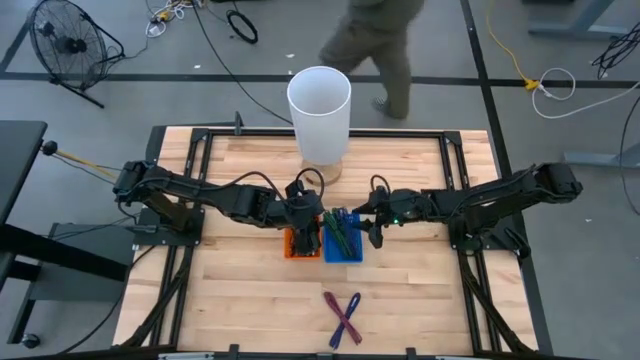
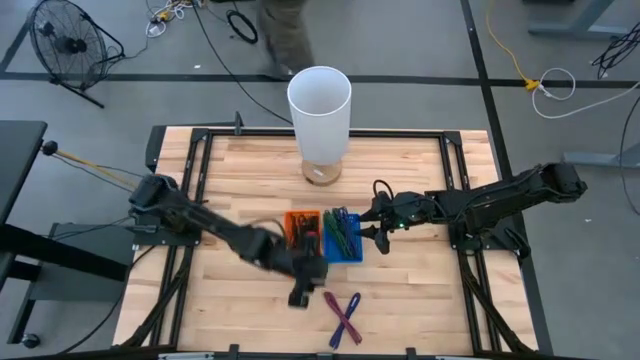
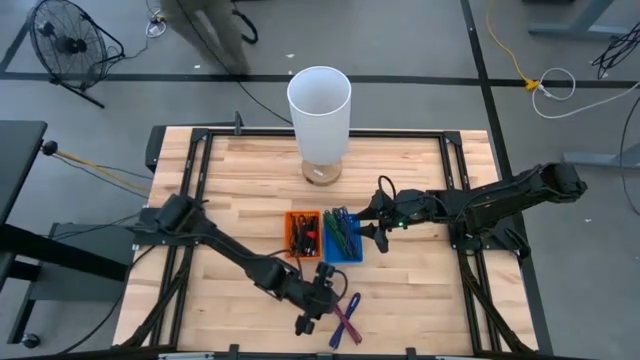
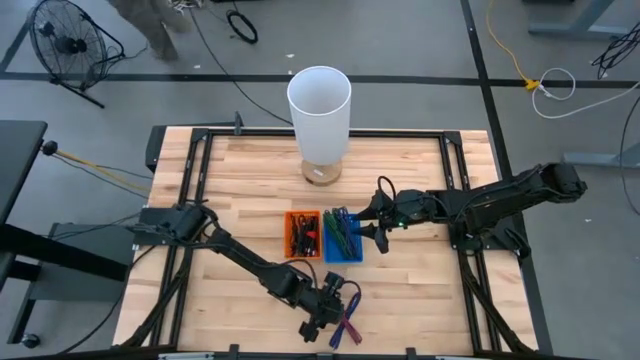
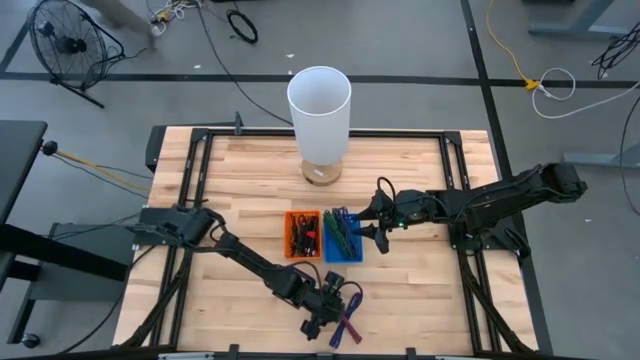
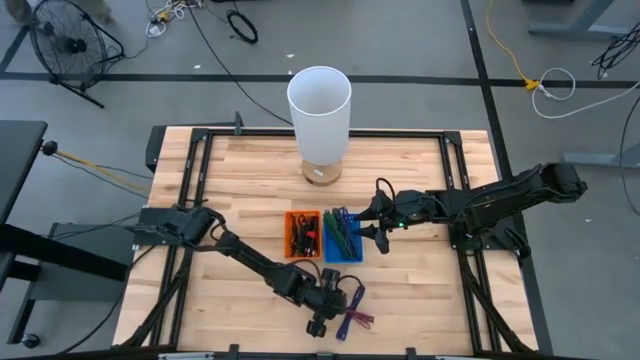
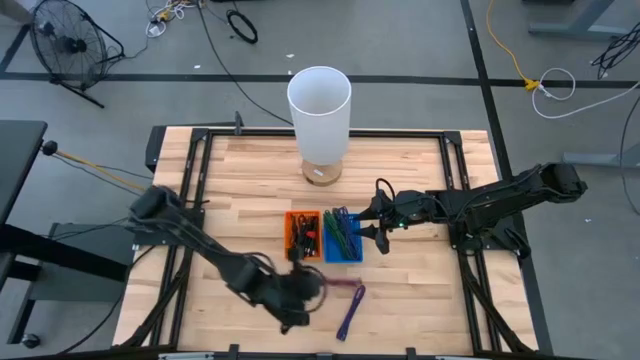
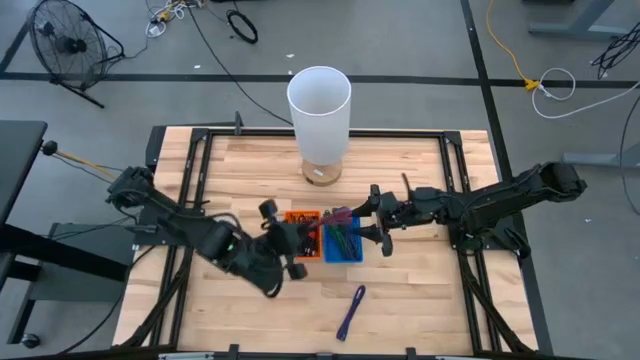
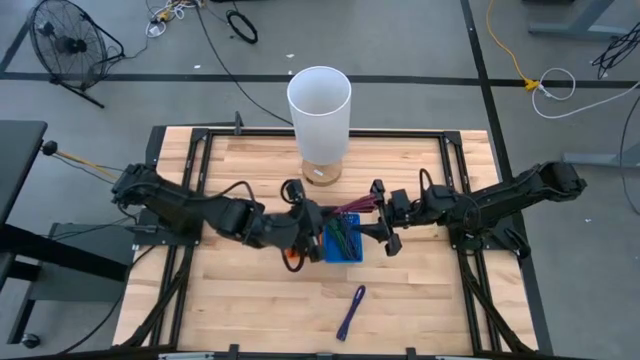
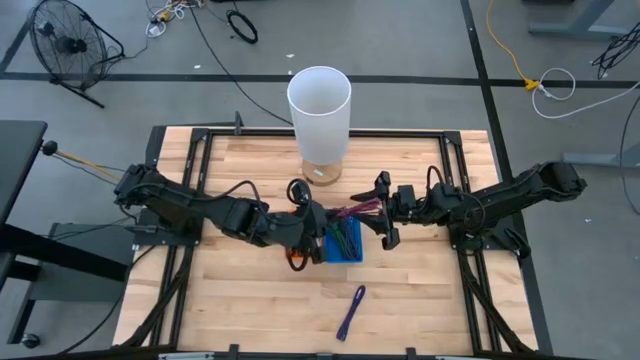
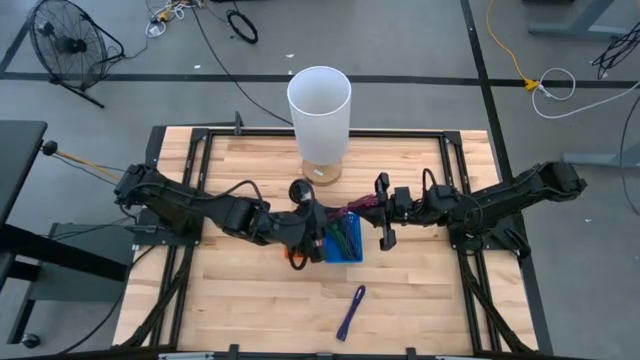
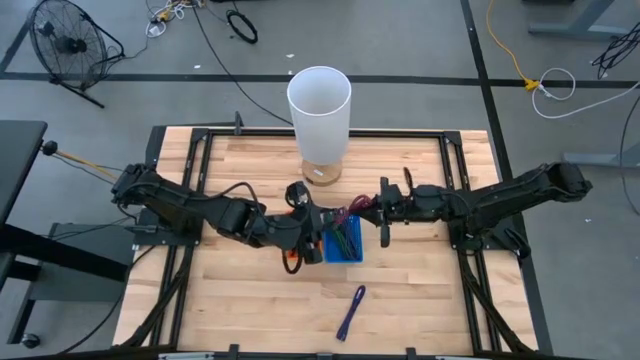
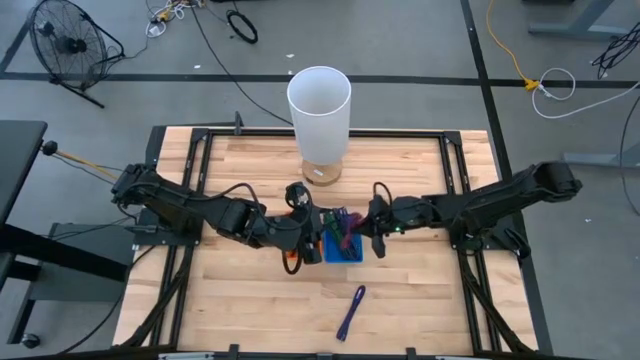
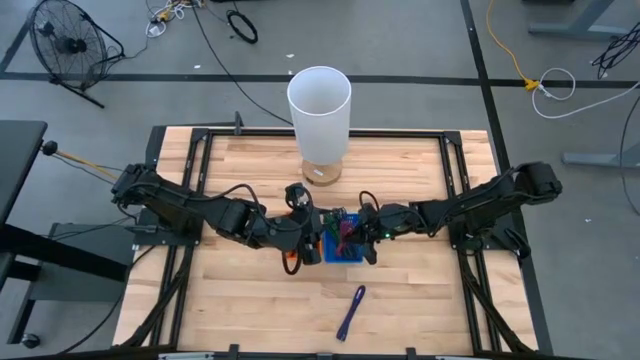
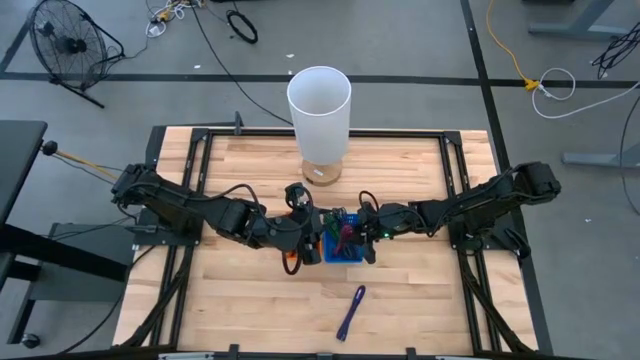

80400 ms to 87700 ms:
Task: Pick & Place USB Port
Put the pink USB cable into the blue bin

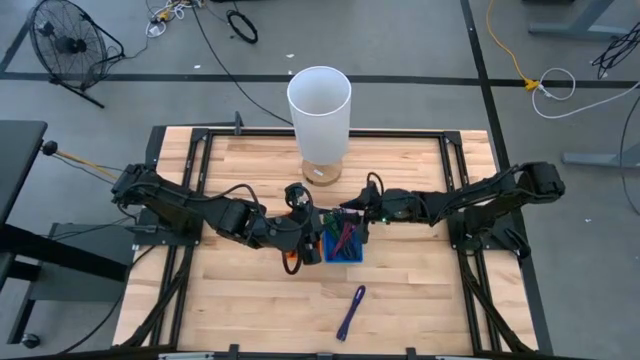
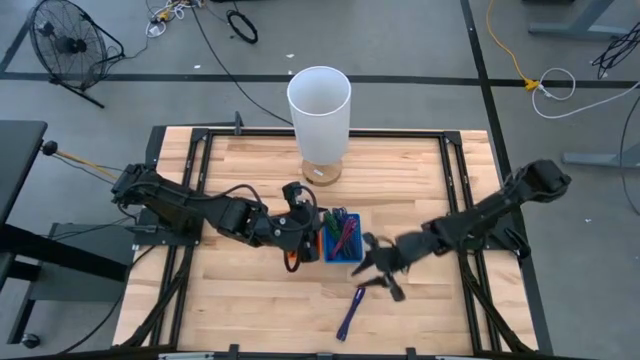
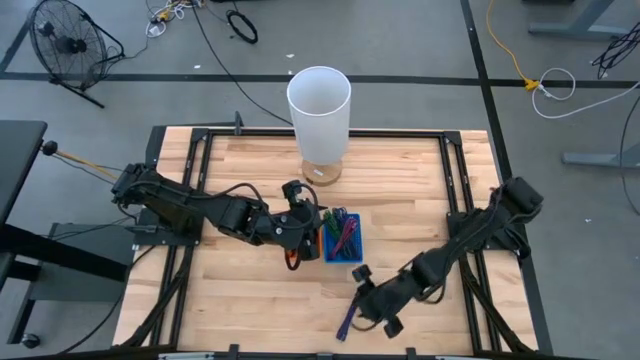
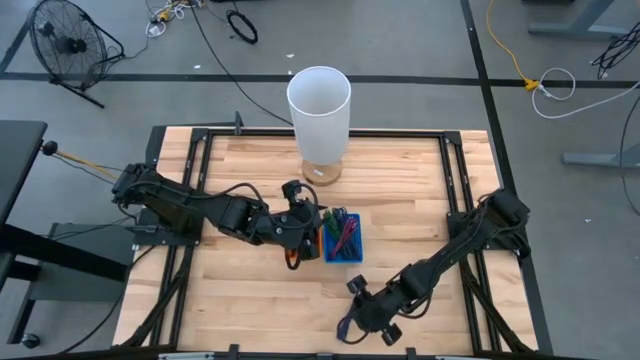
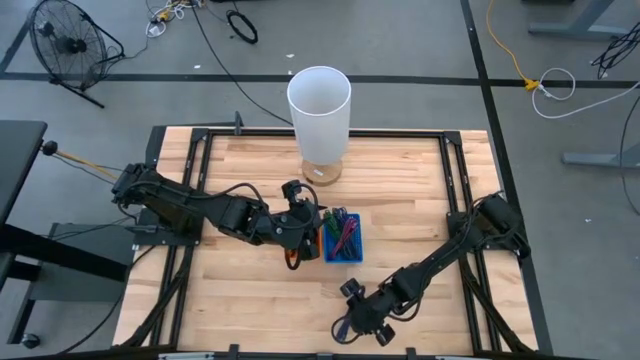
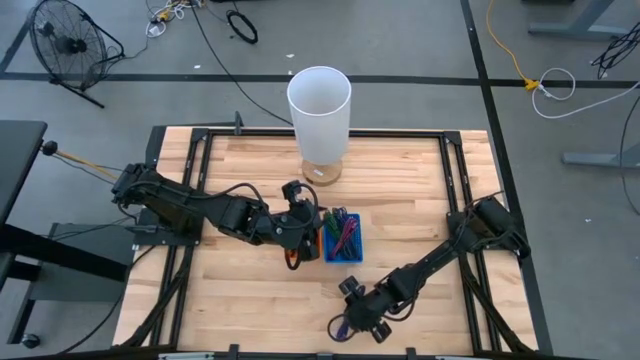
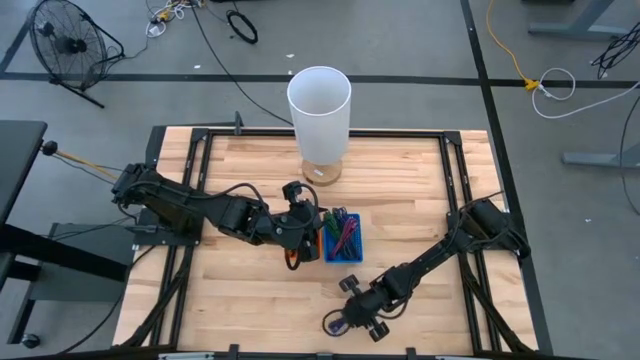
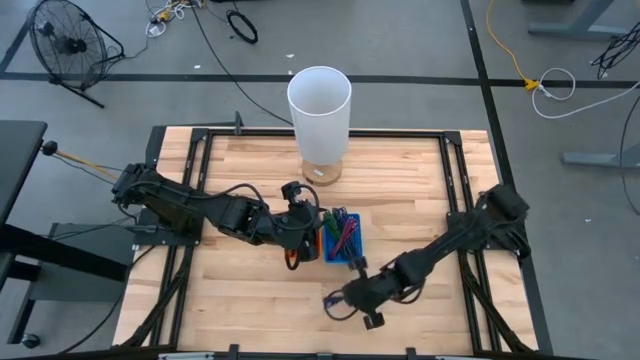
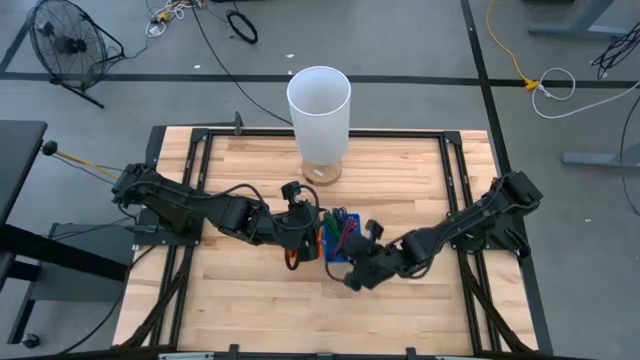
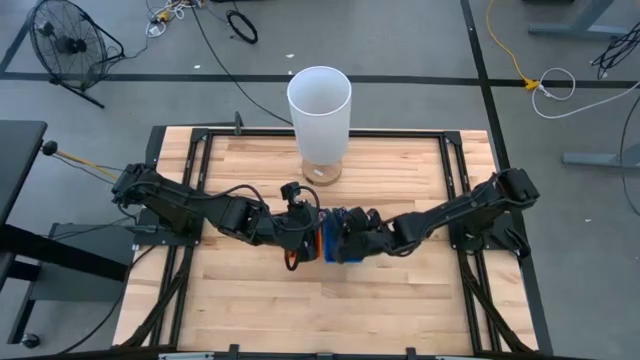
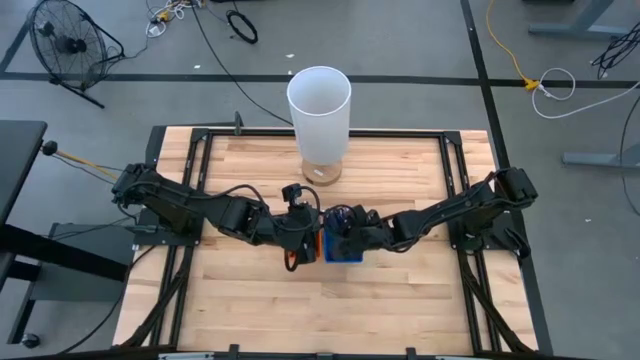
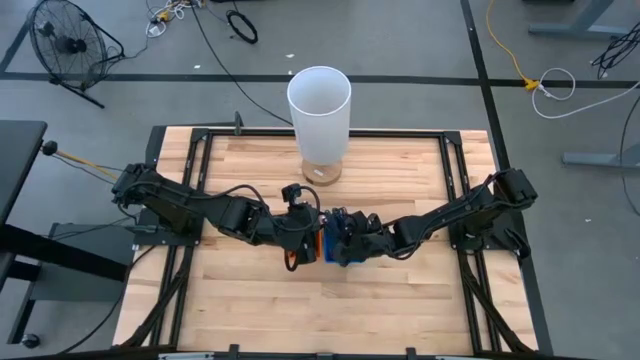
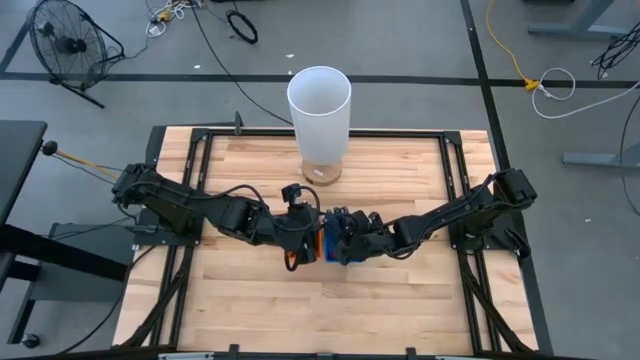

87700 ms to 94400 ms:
Put the blue USB cable into the blue bin

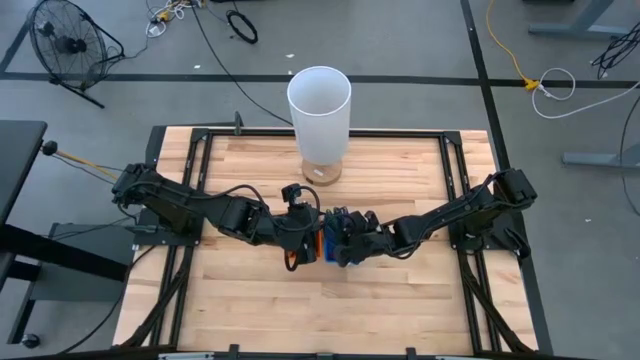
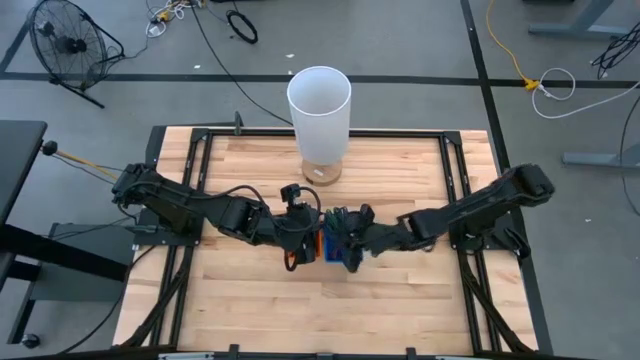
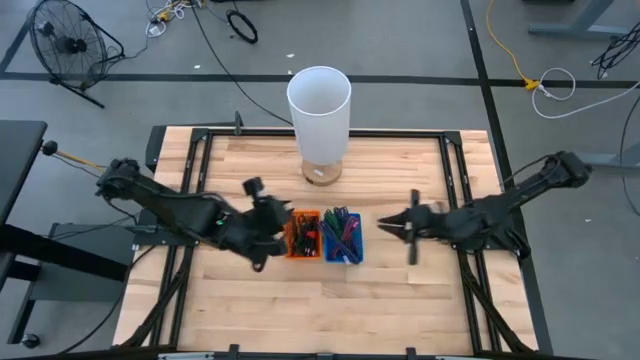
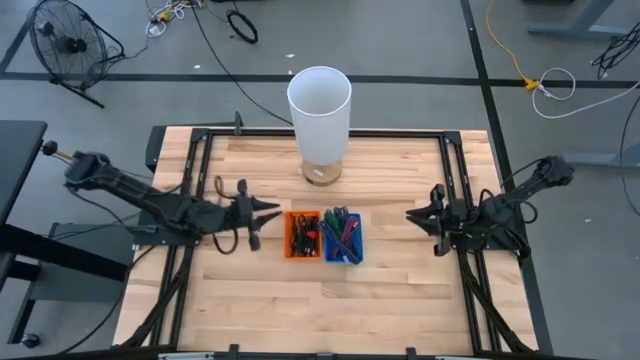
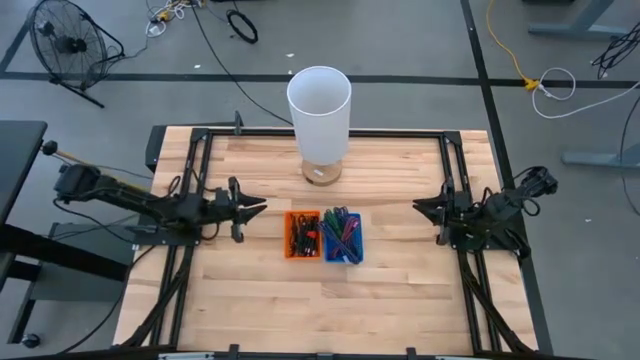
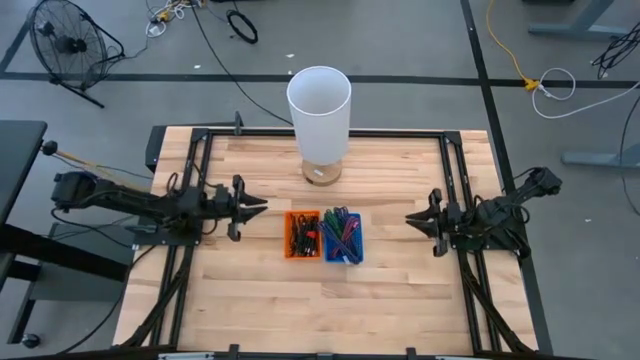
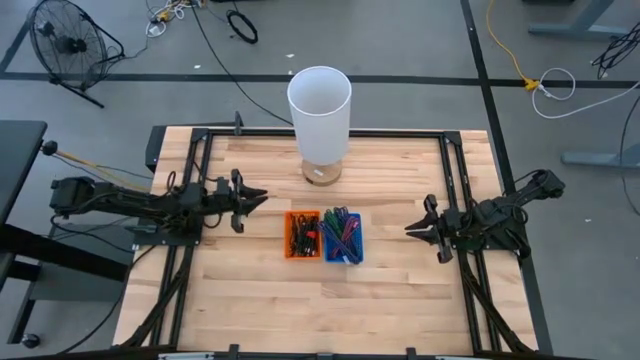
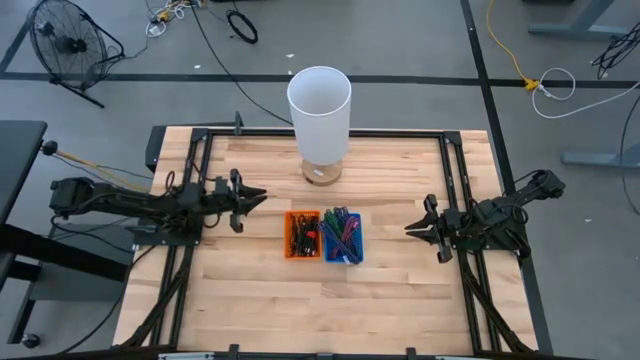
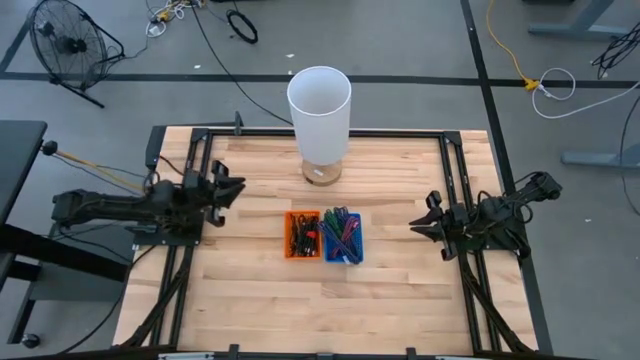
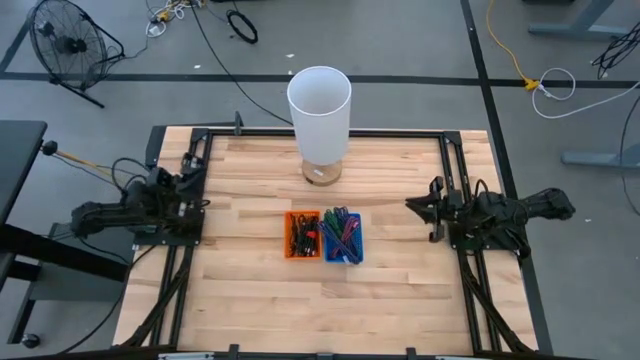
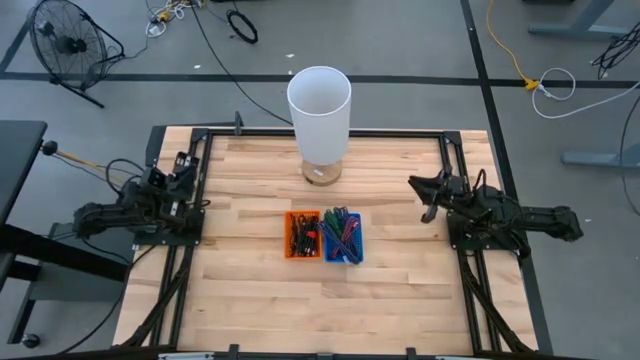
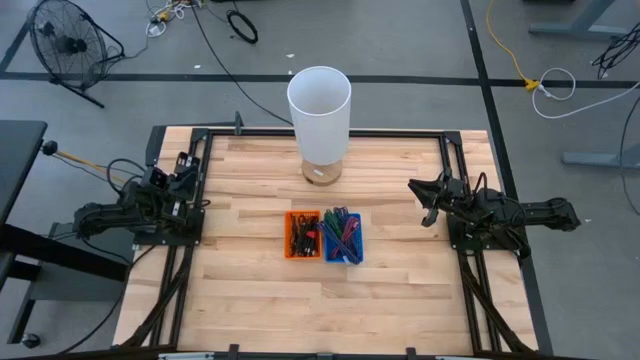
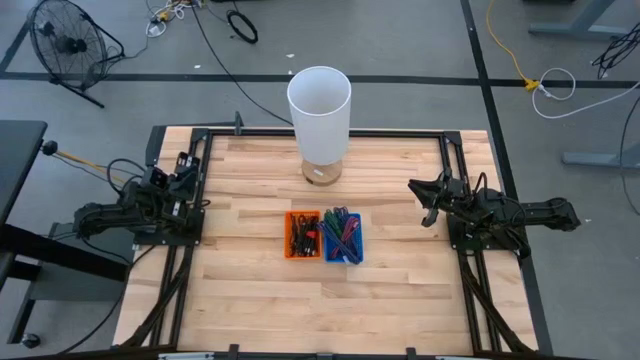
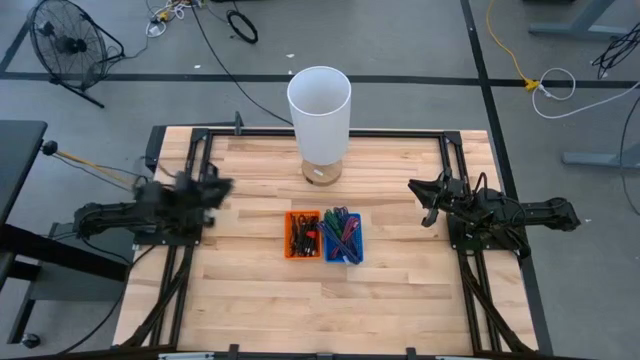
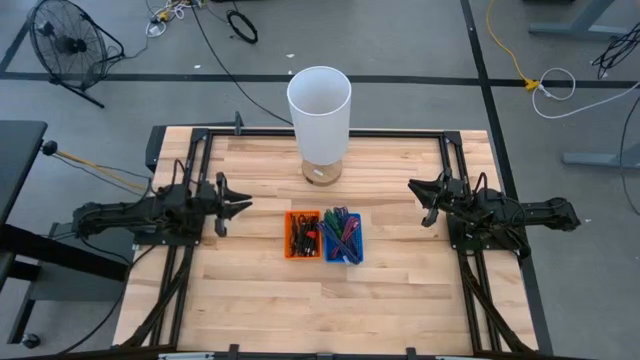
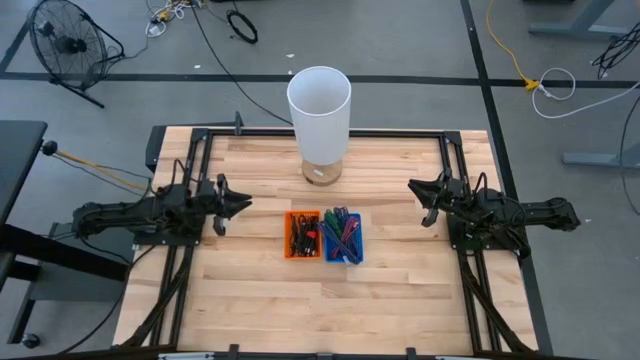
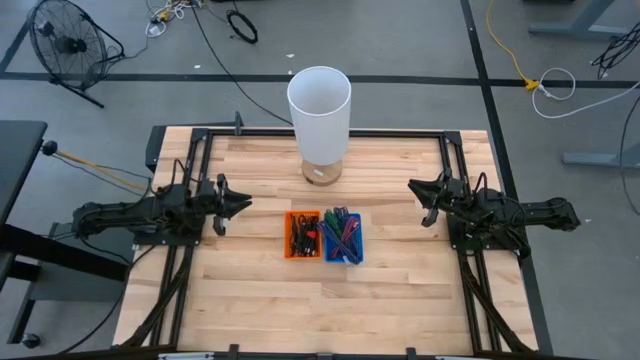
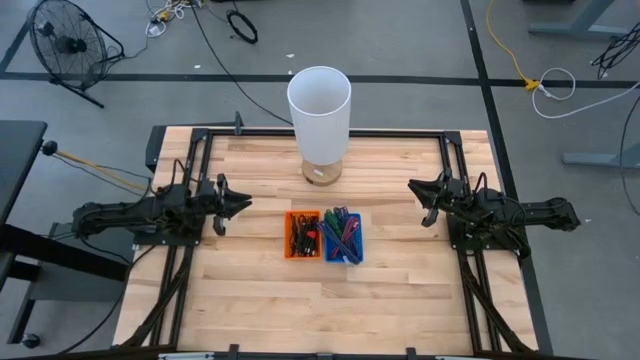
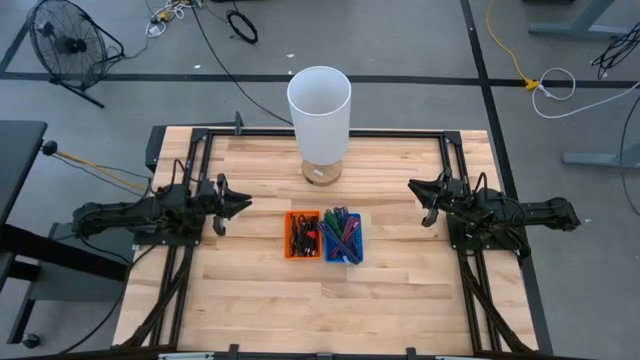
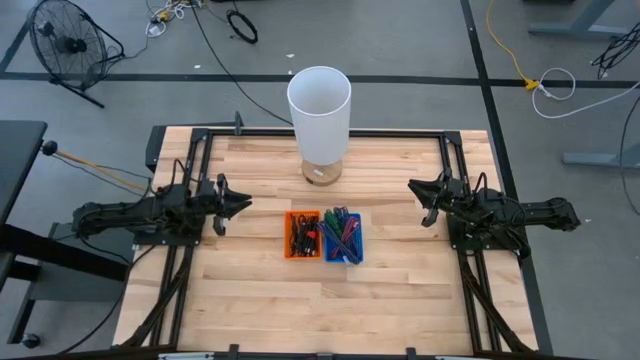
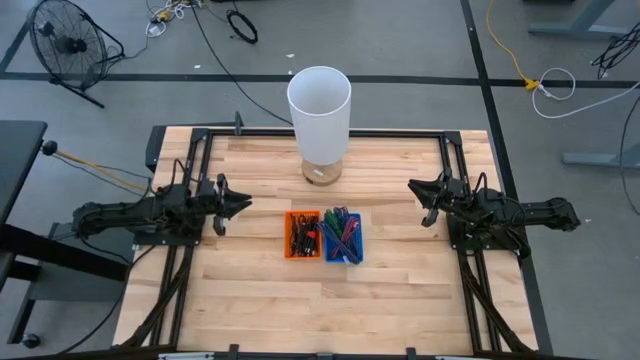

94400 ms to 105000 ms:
Return to Home Position
